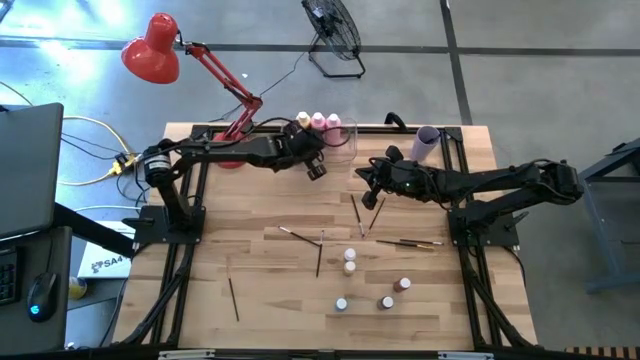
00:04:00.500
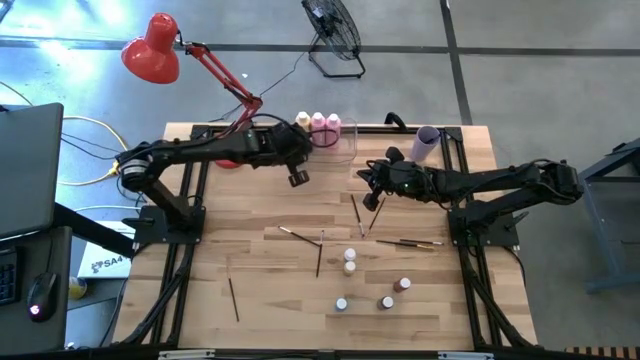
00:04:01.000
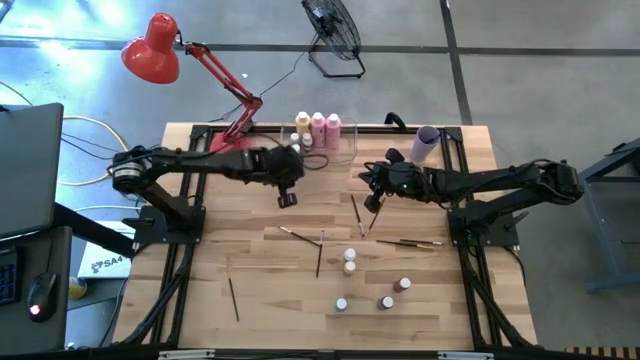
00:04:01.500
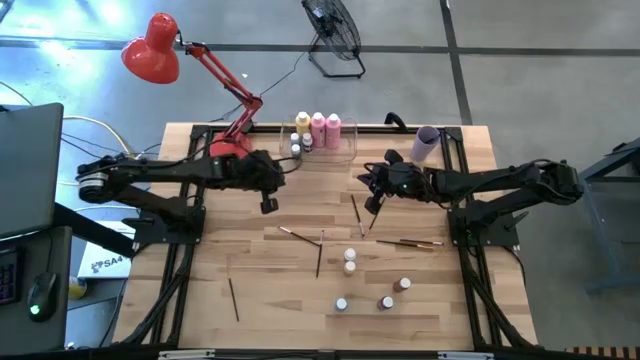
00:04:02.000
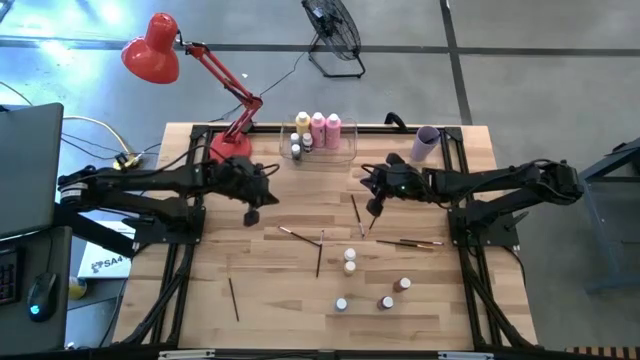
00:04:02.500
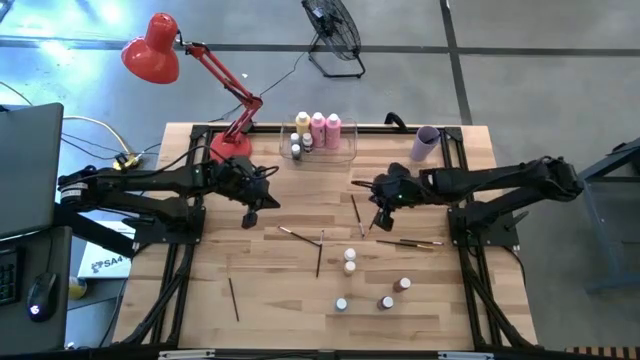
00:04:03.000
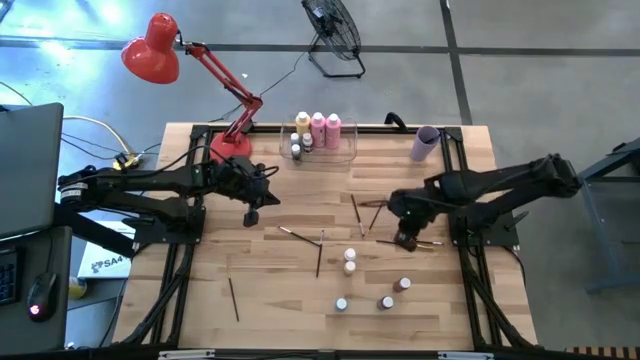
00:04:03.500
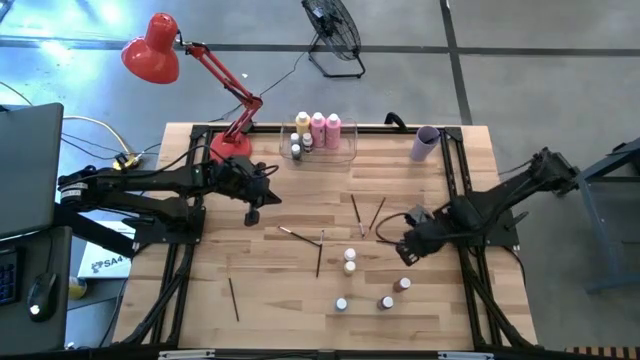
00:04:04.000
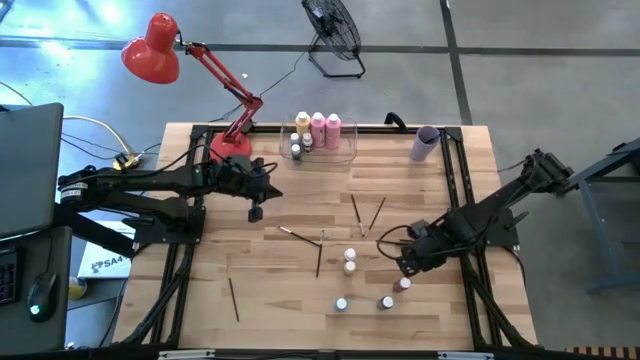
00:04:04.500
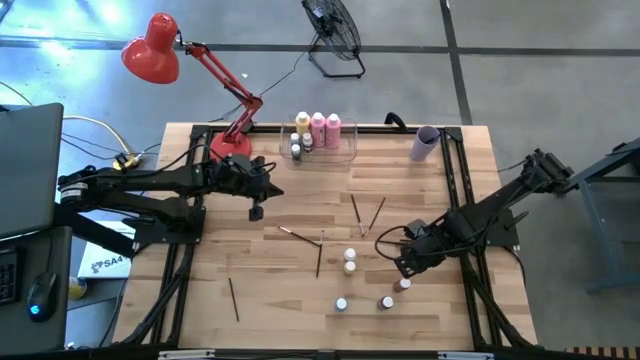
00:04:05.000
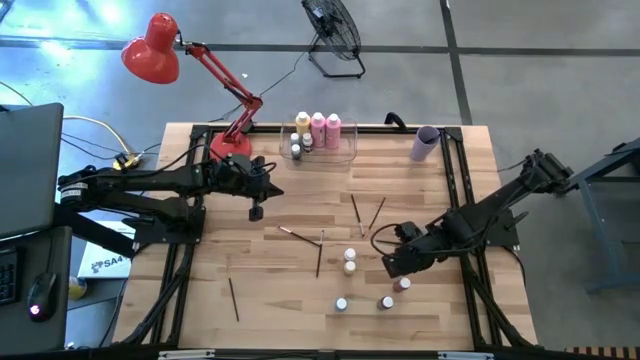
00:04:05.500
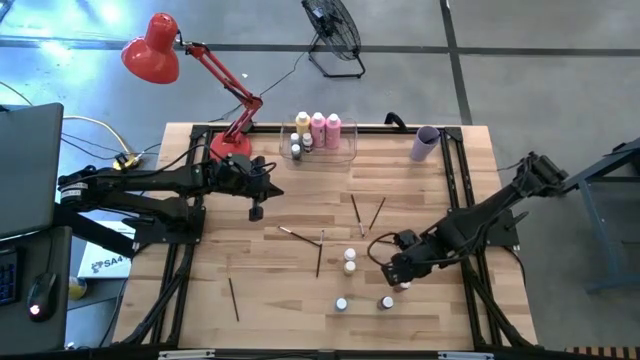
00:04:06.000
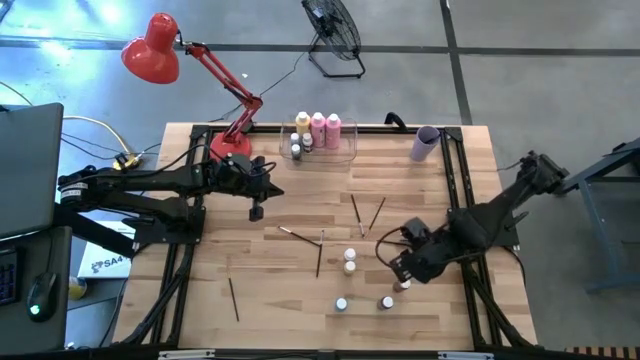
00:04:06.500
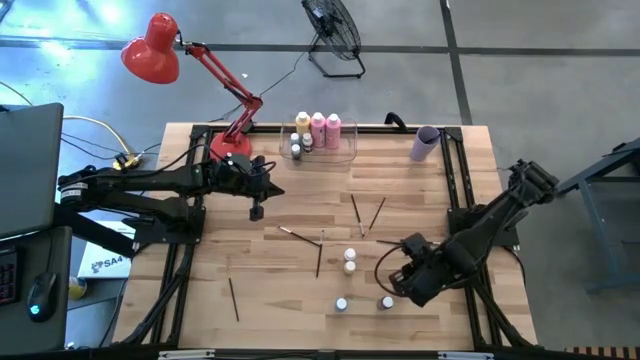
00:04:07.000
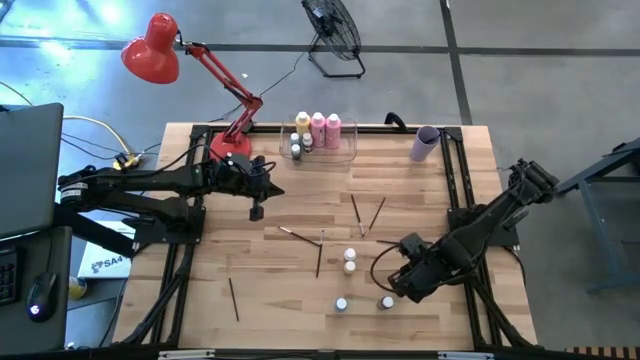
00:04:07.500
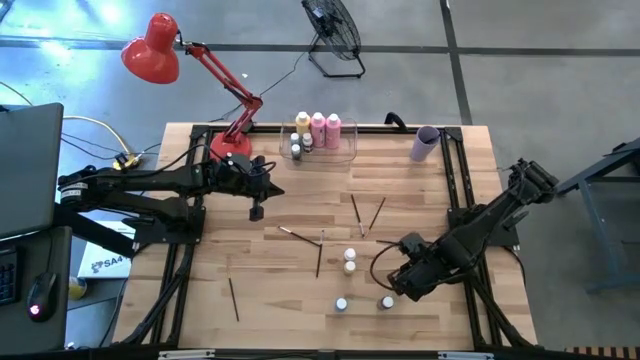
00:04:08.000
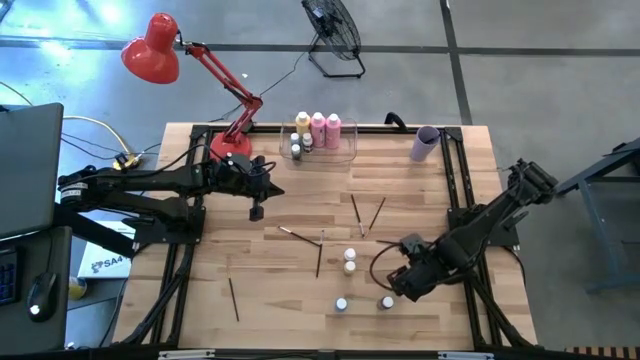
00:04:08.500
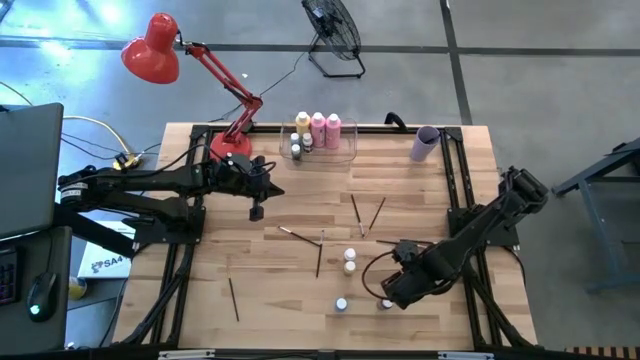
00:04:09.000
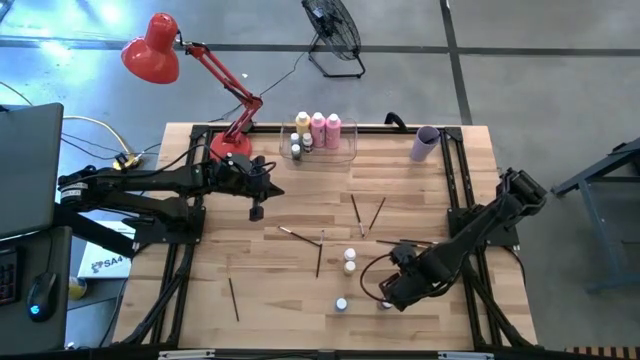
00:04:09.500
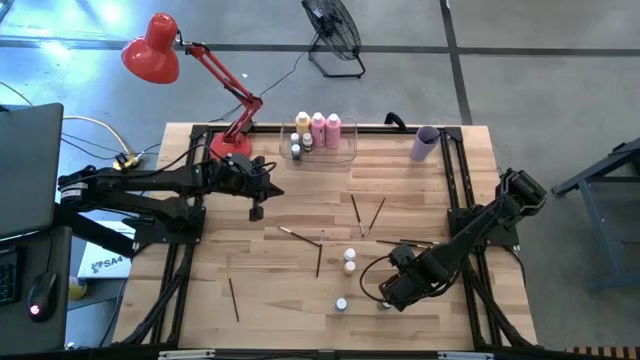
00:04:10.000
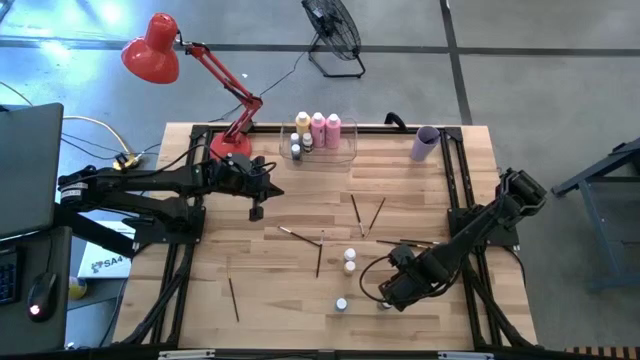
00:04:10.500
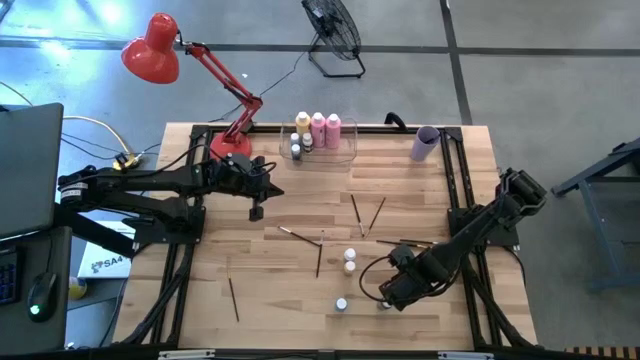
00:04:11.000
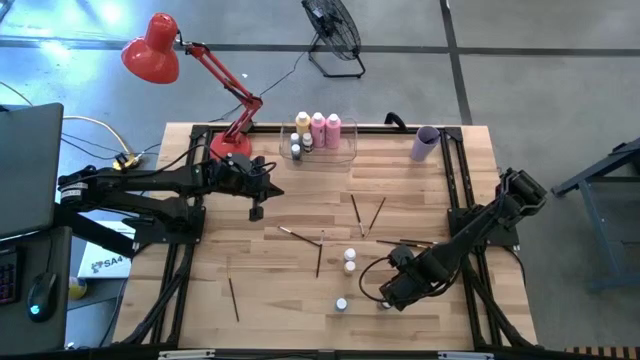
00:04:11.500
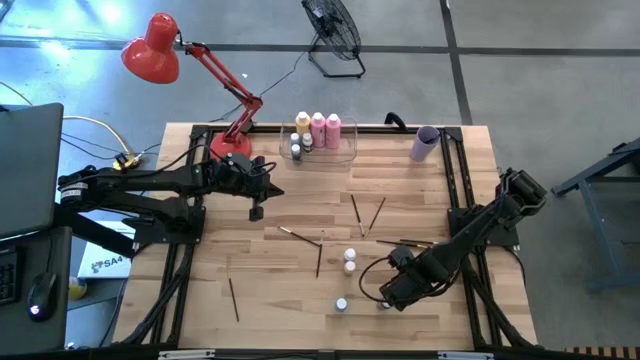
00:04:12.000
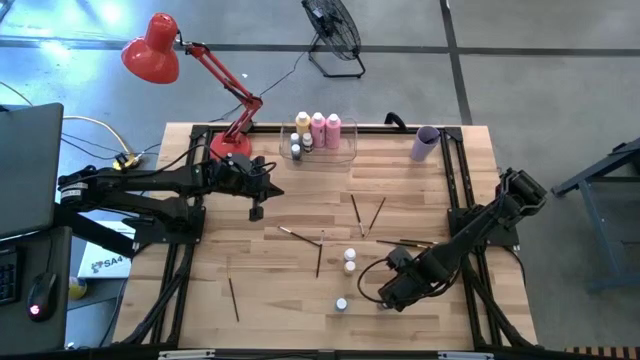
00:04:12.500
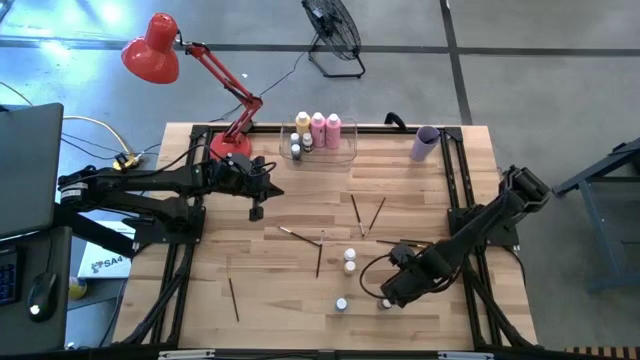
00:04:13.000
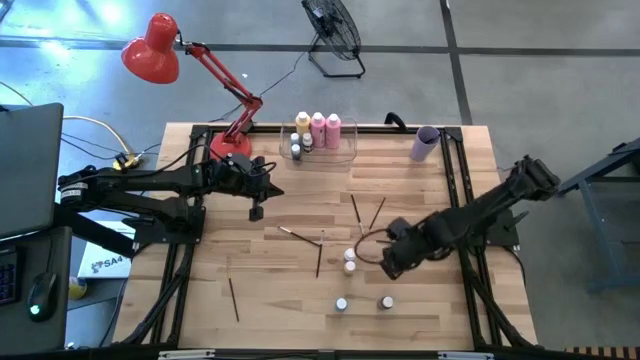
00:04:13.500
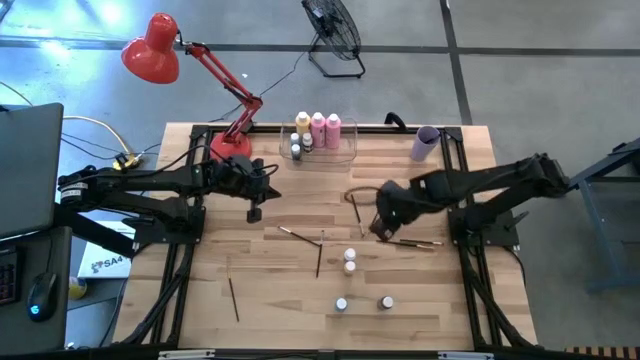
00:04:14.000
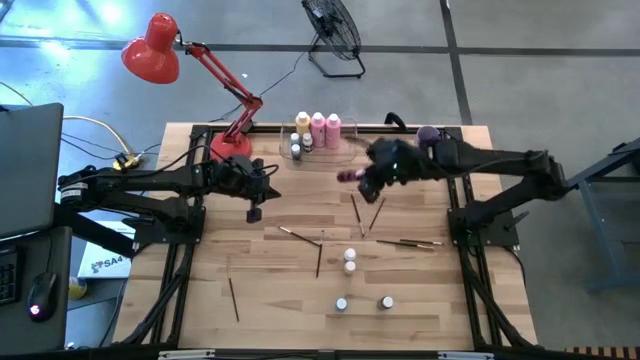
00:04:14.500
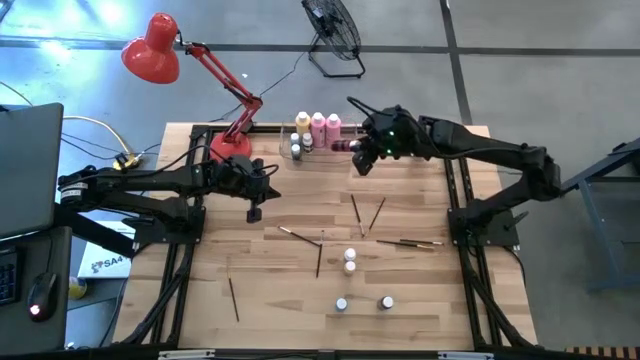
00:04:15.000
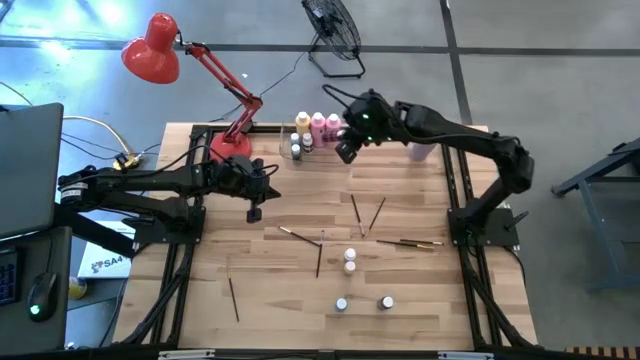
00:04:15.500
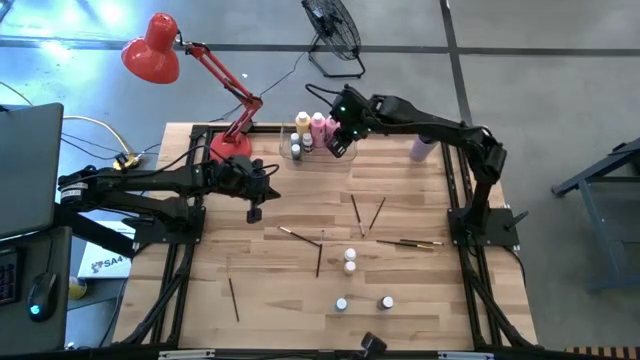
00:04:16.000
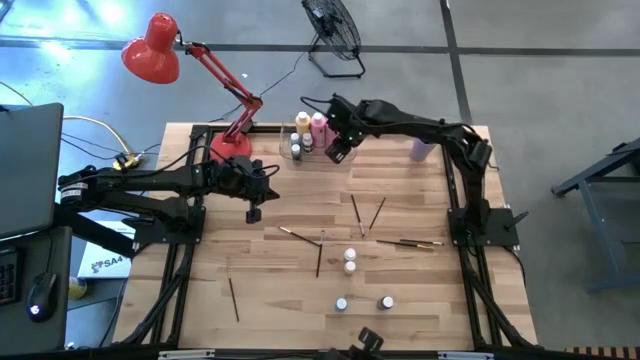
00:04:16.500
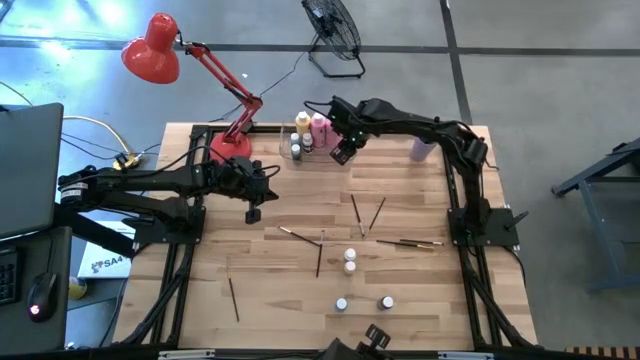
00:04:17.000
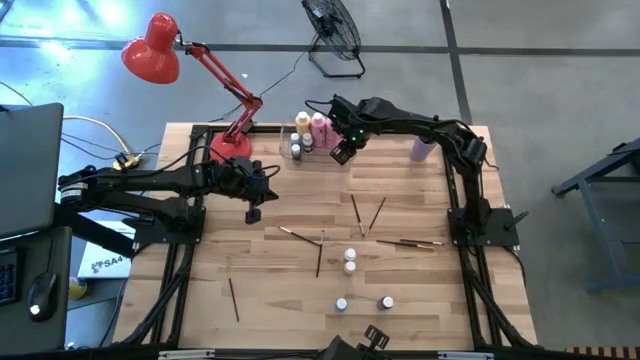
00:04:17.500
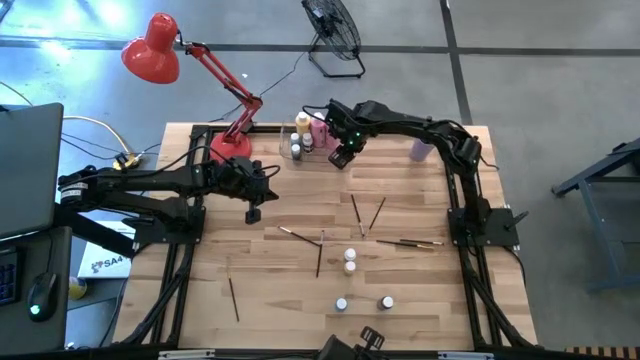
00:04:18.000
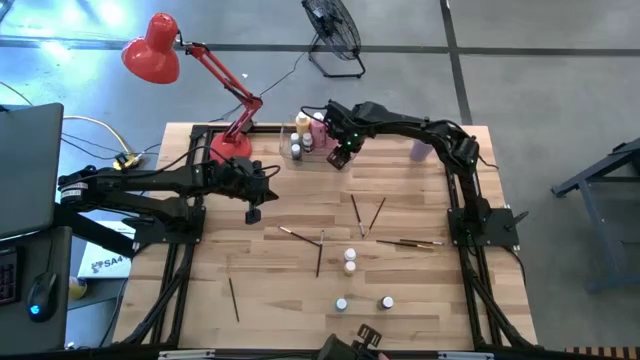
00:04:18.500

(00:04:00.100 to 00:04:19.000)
Task: Pick & Place Paint Supplies
Put the small red paint bottle into the transparent bin

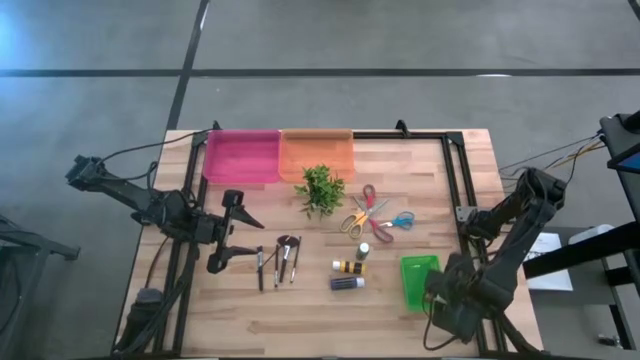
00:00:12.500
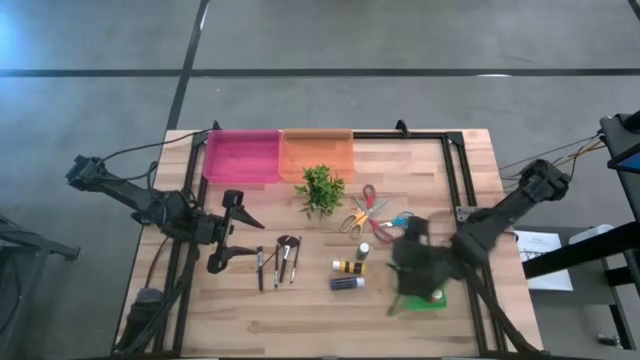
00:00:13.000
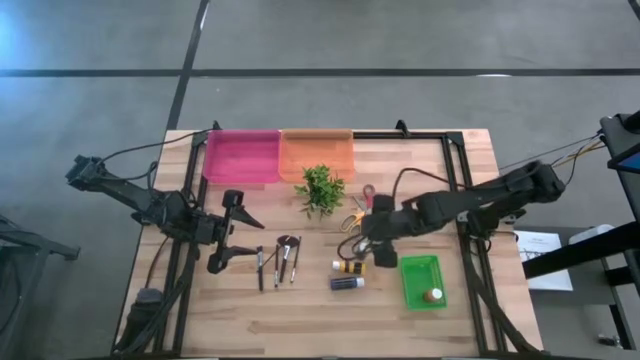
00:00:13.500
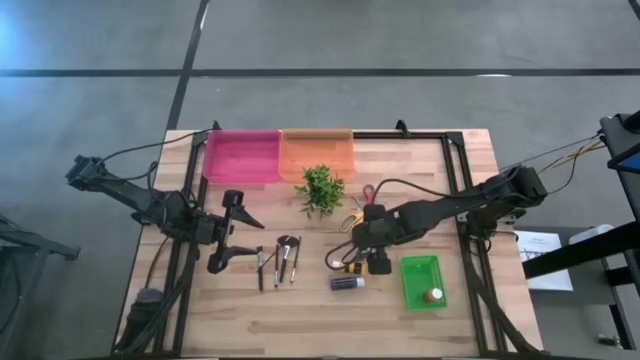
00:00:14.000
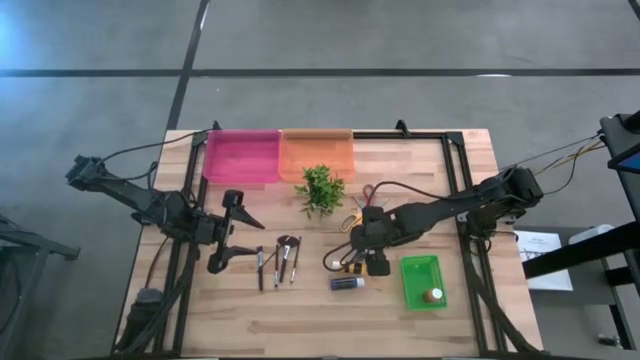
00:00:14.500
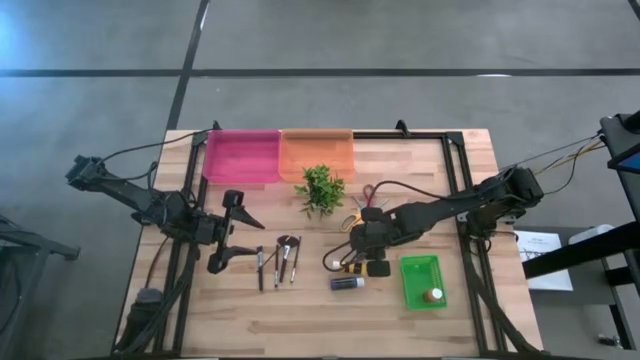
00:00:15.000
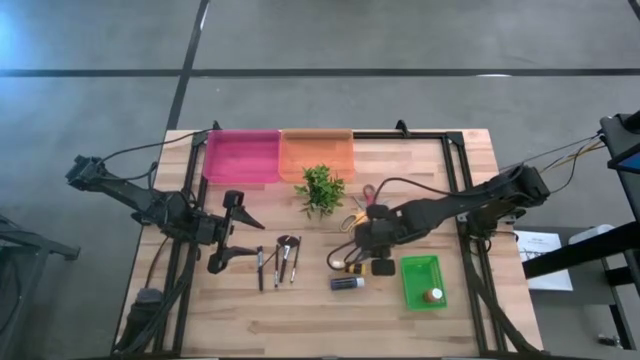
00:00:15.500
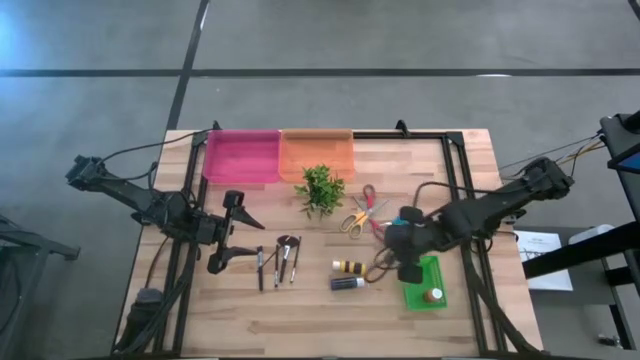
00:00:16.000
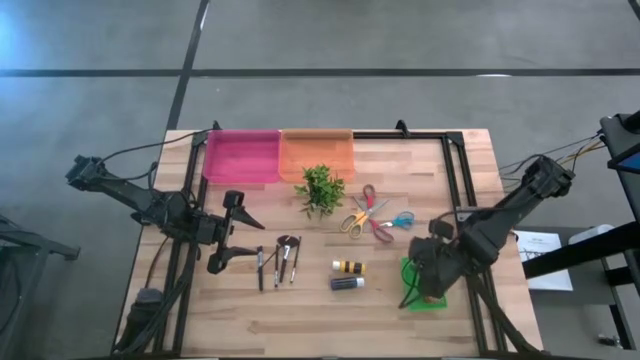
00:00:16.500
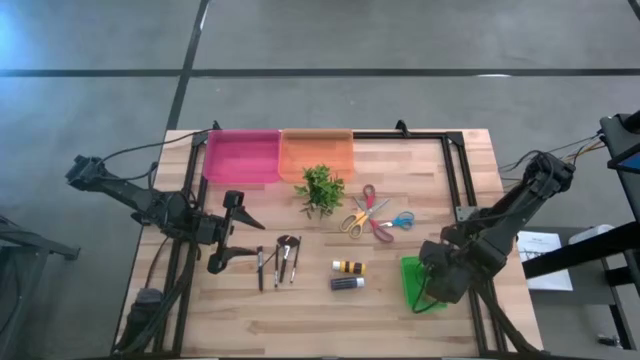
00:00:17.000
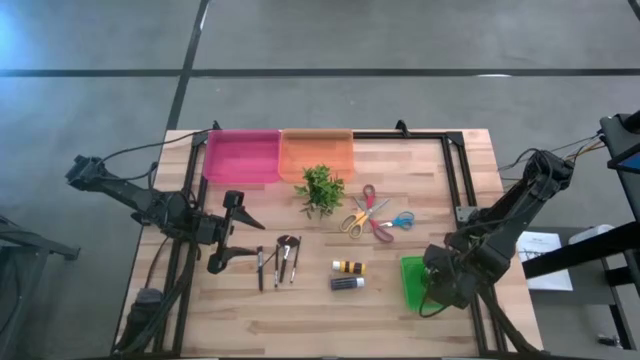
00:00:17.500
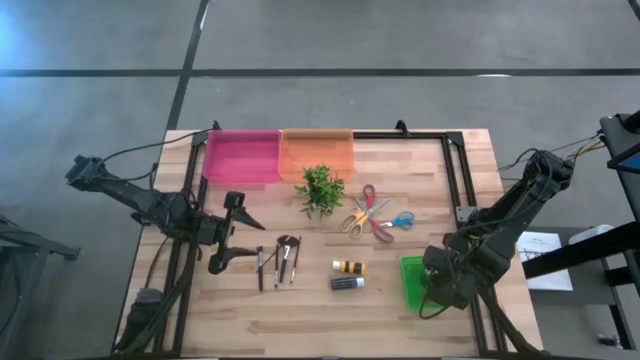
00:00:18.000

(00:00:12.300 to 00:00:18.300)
Task: Pick & Place Paint Supplies
Put the green paint bottle into the green bin
